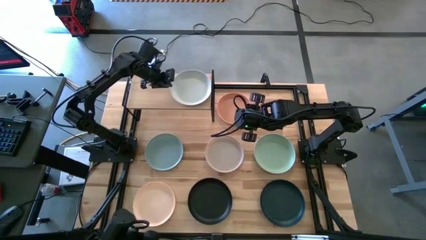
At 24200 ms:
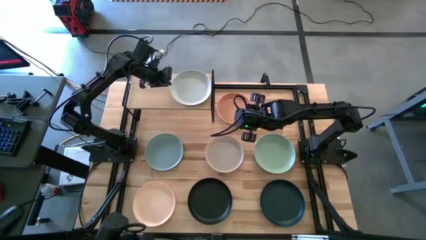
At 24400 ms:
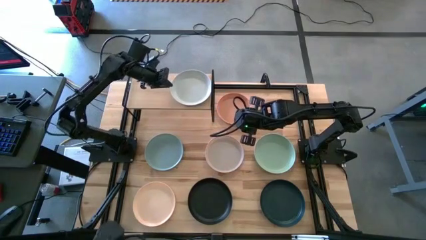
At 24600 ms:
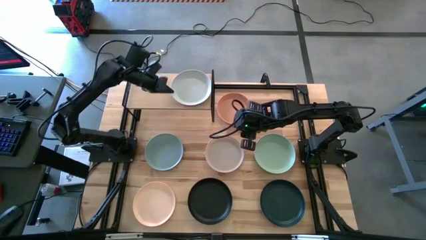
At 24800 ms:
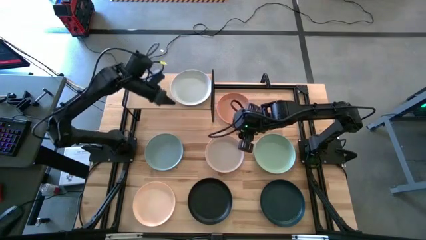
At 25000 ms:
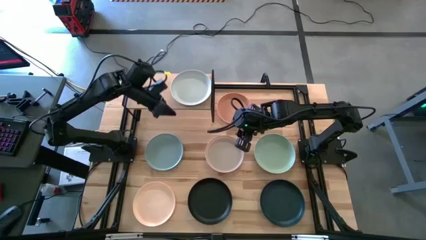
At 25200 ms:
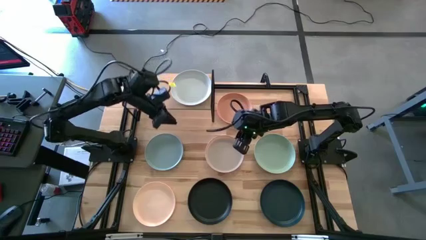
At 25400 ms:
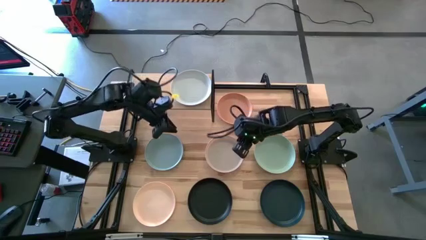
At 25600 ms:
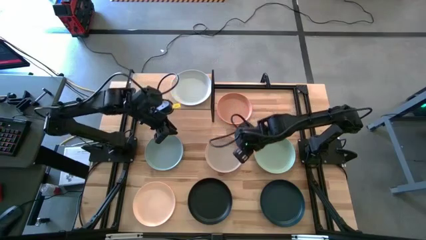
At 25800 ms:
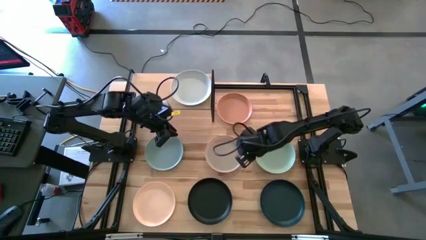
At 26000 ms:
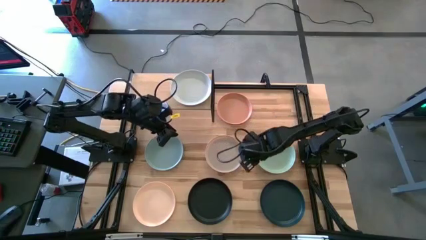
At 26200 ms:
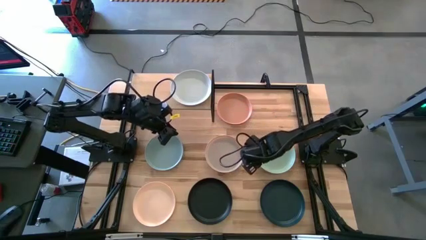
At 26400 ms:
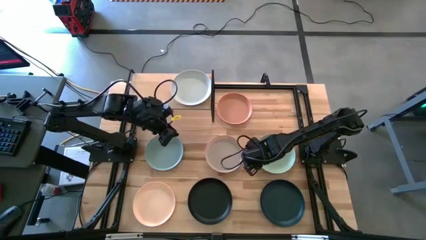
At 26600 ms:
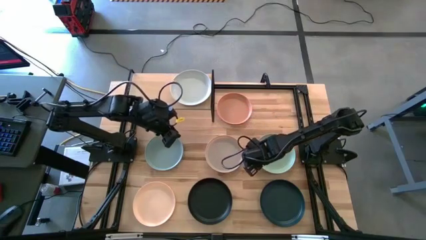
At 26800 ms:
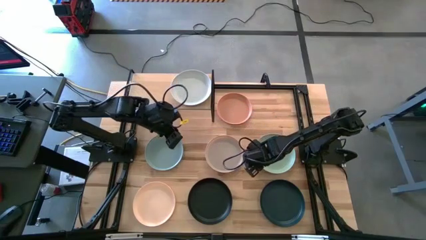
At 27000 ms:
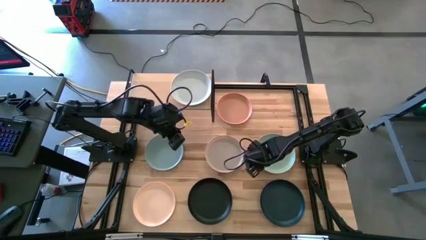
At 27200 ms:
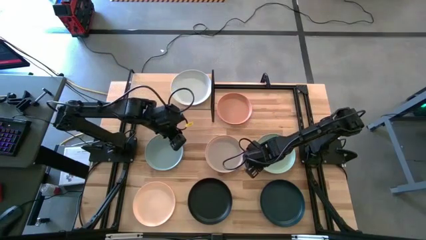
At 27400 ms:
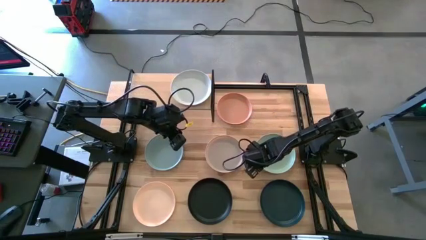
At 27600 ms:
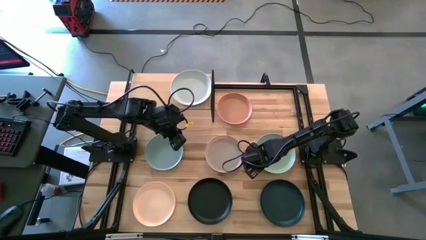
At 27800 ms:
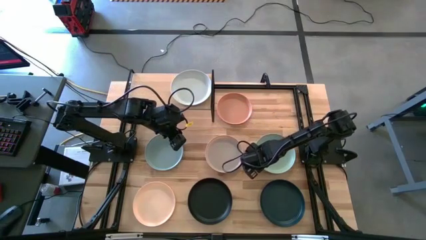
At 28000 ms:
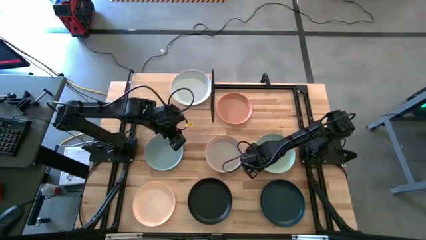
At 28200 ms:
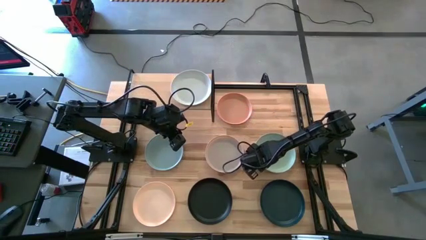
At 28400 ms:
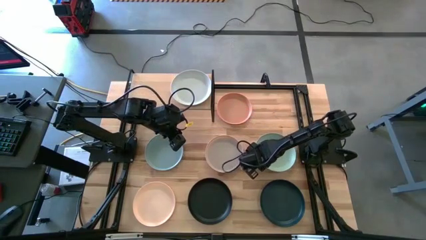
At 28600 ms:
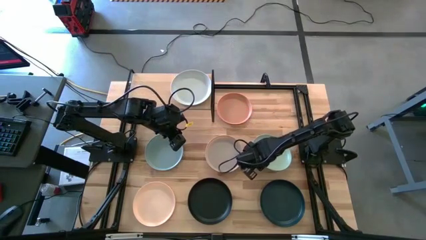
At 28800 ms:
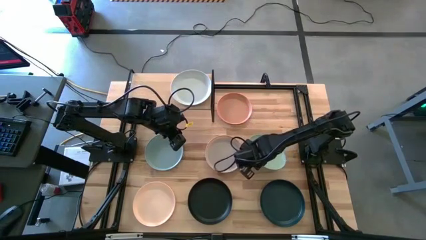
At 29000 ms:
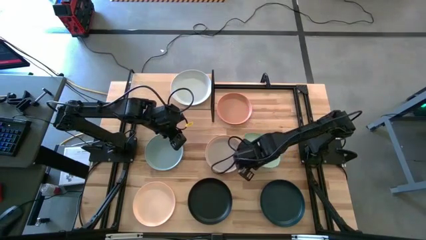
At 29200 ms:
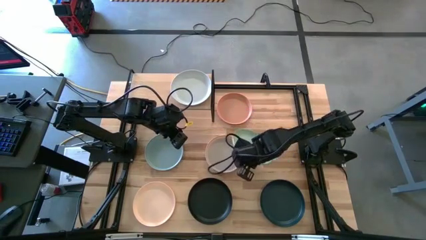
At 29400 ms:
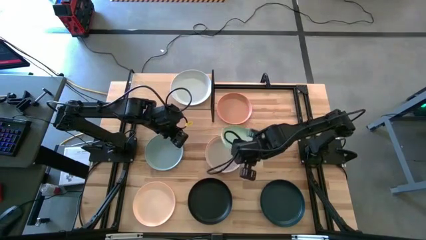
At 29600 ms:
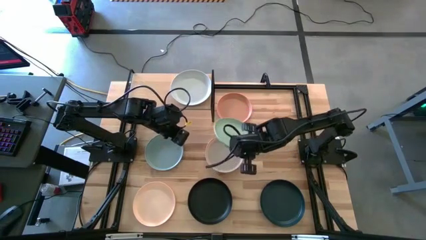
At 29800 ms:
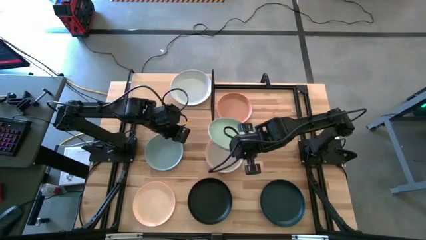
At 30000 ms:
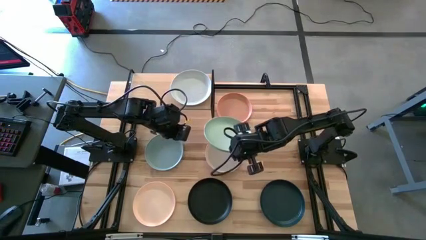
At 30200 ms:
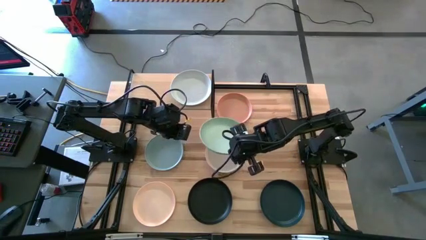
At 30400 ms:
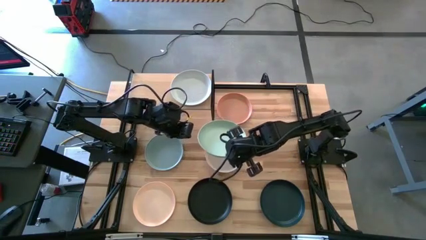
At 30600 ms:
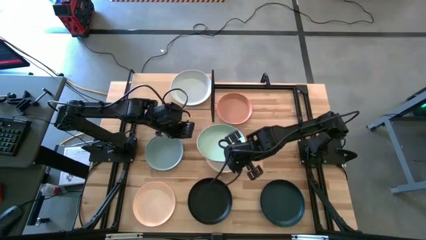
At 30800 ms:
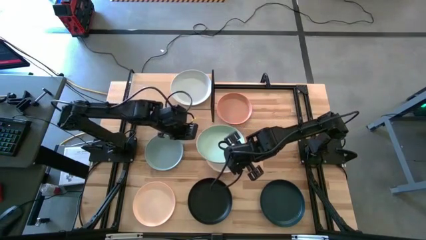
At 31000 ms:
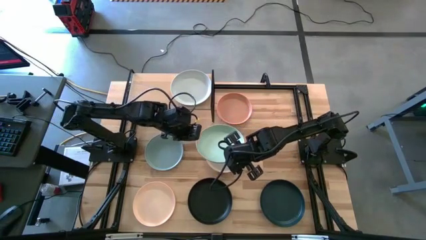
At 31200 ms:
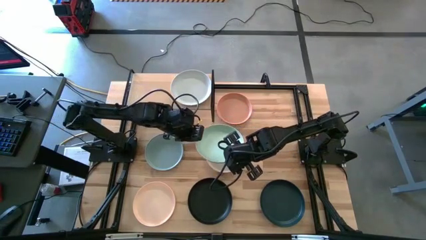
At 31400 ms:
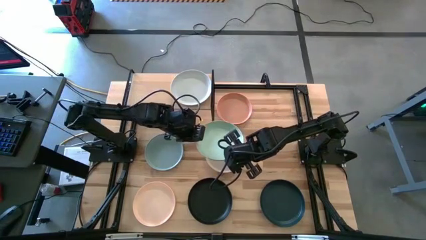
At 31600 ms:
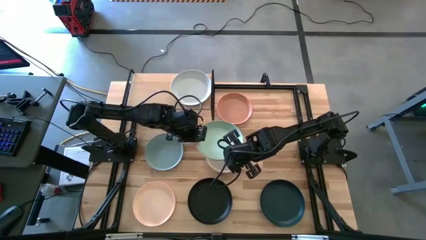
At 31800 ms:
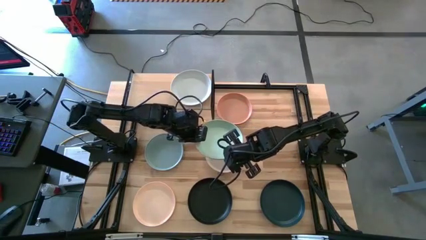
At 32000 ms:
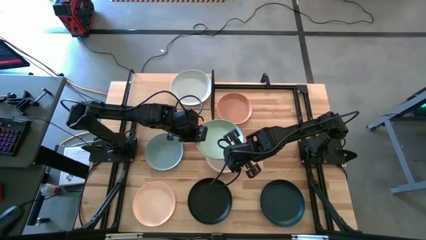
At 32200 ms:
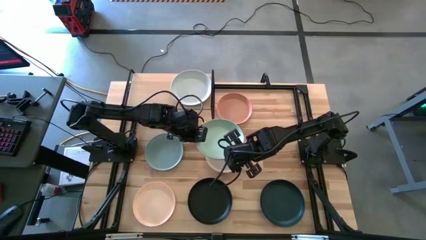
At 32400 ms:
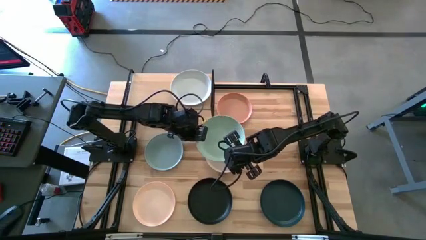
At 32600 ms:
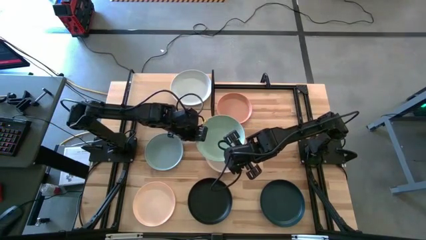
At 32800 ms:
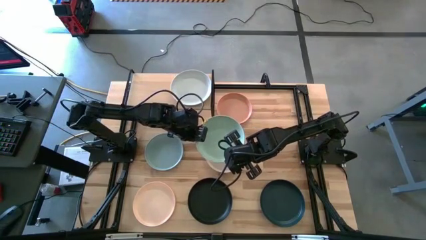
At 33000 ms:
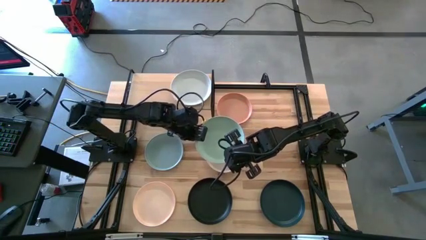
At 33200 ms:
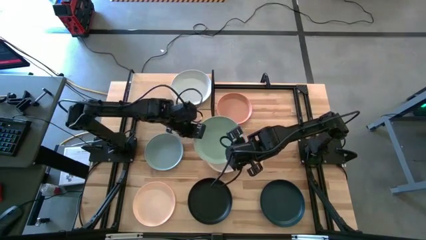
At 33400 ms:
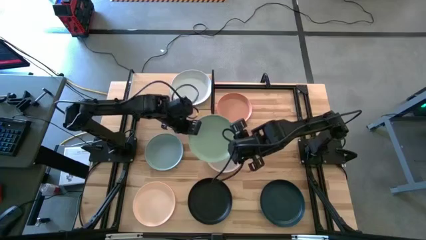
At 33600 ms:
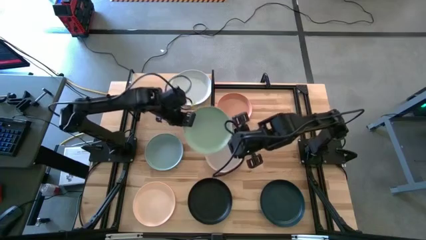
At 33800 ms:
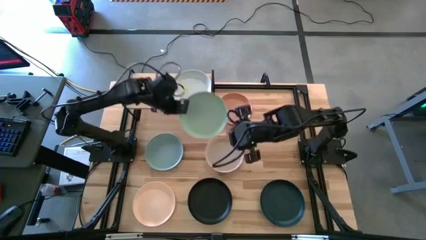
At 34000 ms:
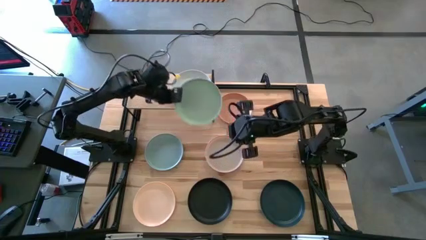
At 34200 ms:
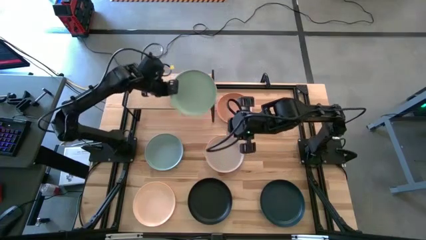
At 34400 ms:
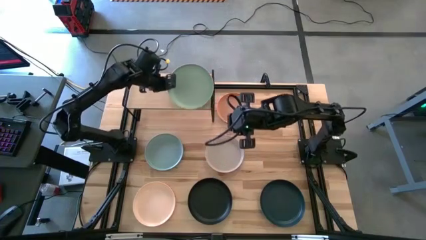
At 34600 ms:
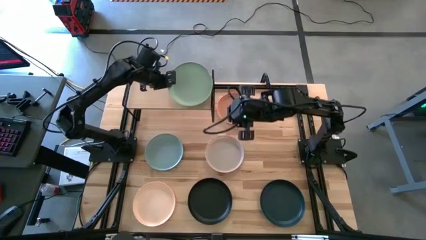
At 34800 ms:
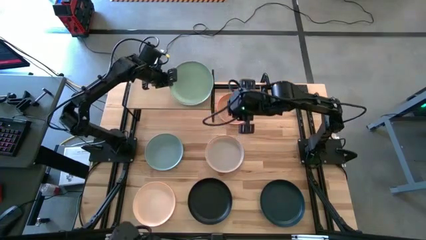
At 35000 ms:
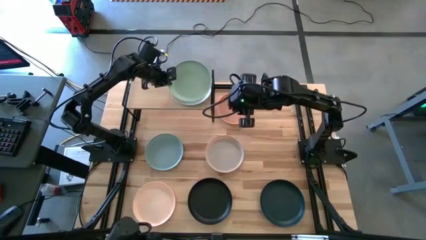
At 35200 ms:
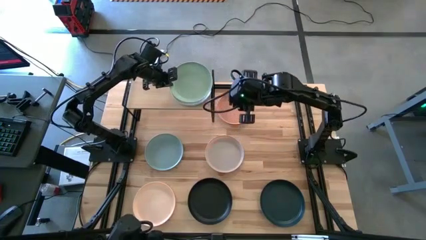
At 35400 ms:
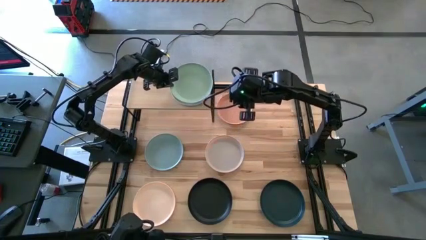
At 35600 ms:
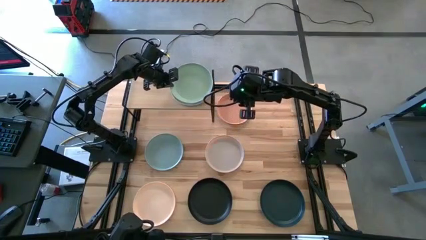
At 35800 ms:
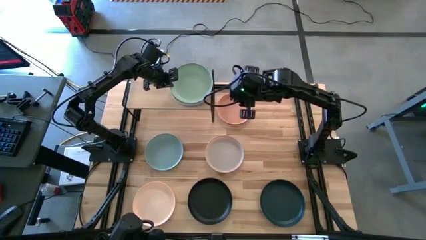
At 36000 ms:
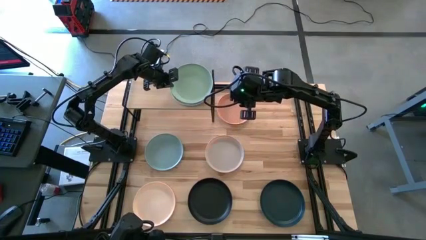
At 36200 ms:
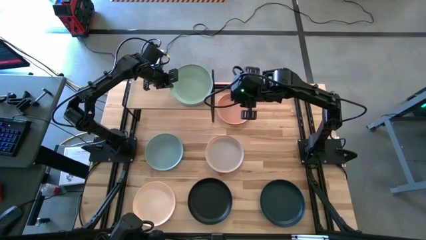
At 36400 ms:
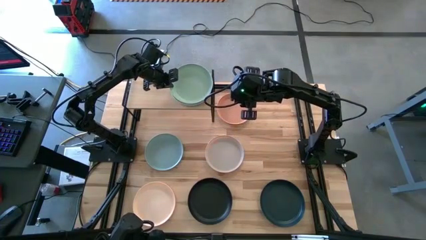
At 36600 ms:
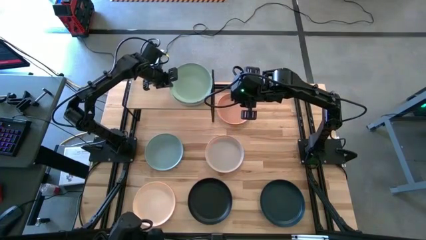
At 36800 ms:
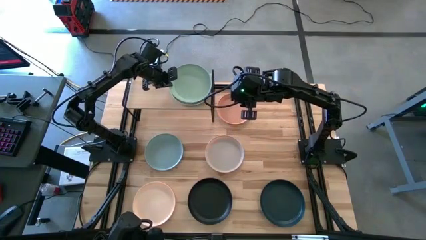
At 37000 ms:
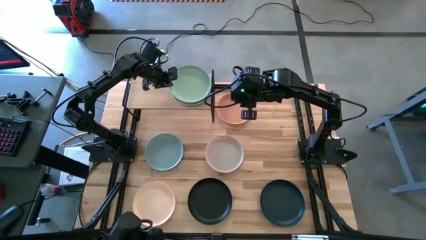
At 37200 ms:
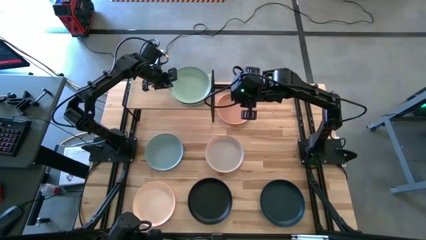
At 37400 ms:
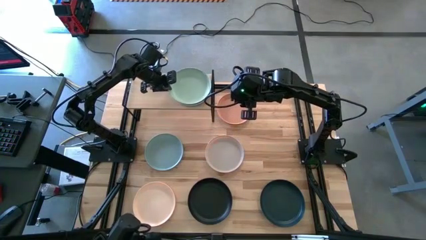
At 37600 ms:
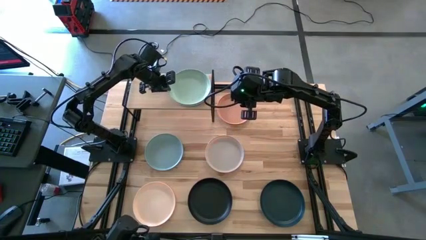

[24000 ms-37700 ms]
Task: Place and stack plates onto a shelf
Stack the green plate on top of the white plate on the shelf
